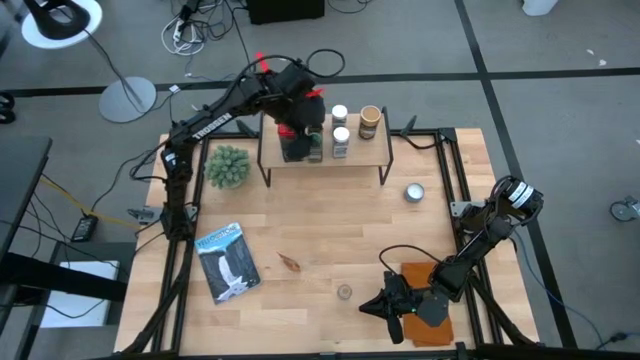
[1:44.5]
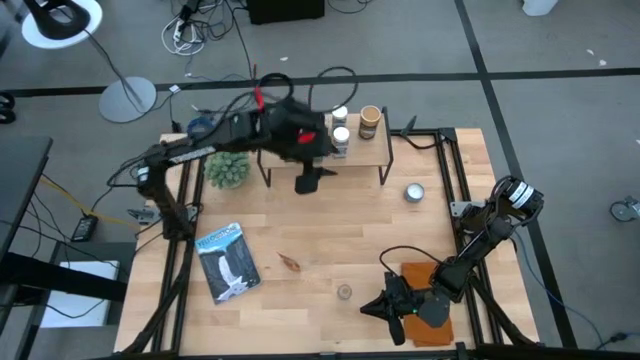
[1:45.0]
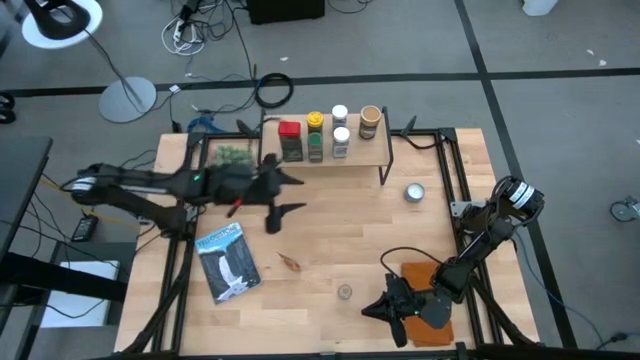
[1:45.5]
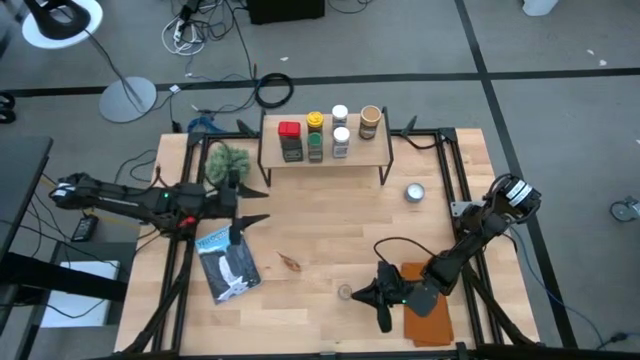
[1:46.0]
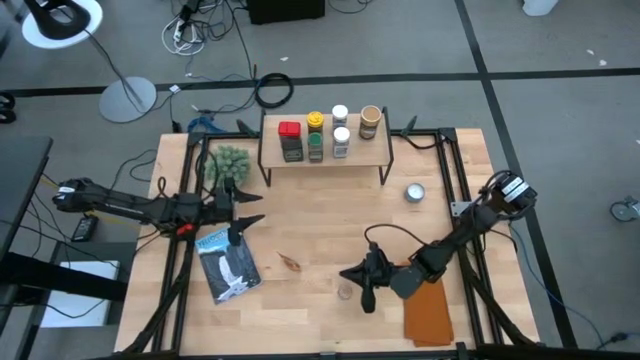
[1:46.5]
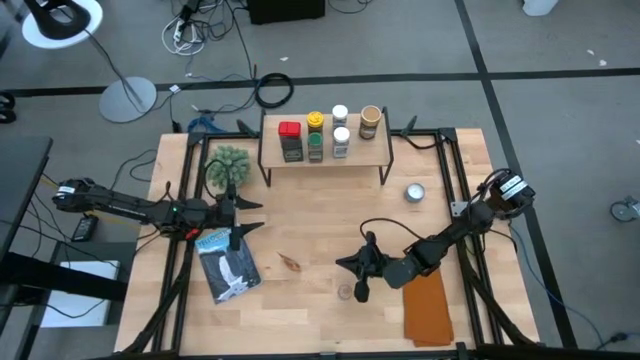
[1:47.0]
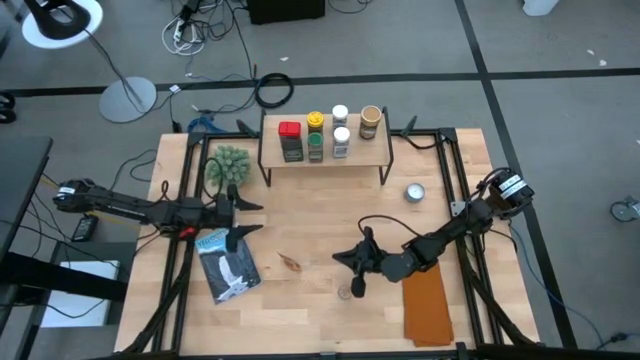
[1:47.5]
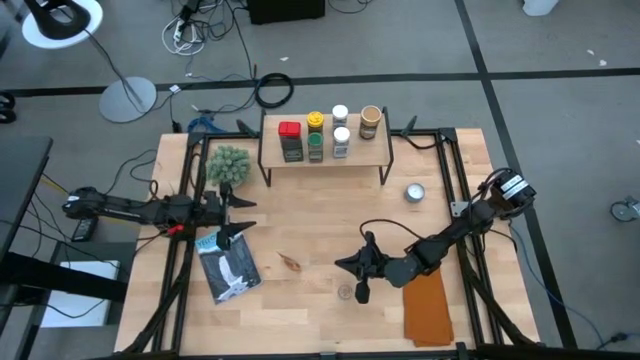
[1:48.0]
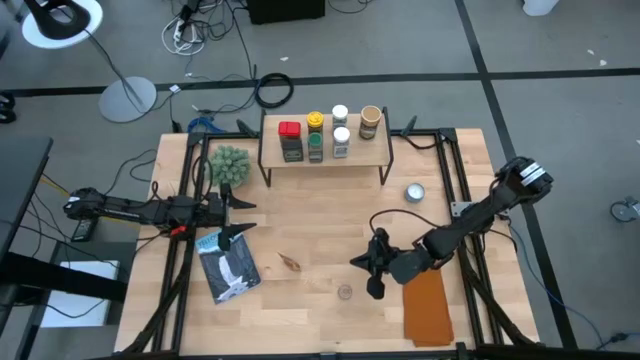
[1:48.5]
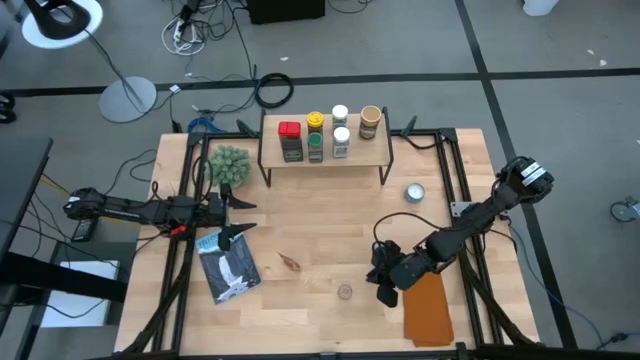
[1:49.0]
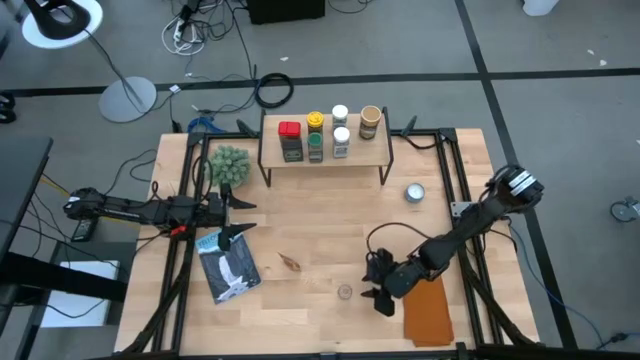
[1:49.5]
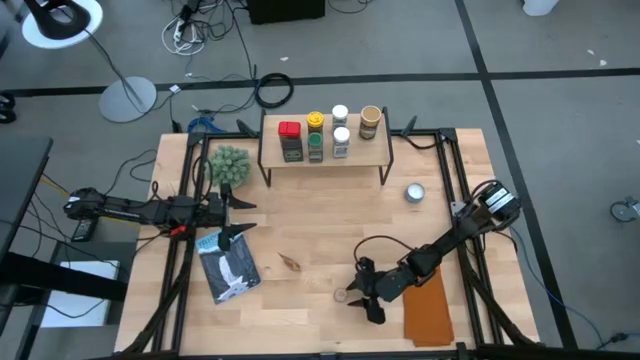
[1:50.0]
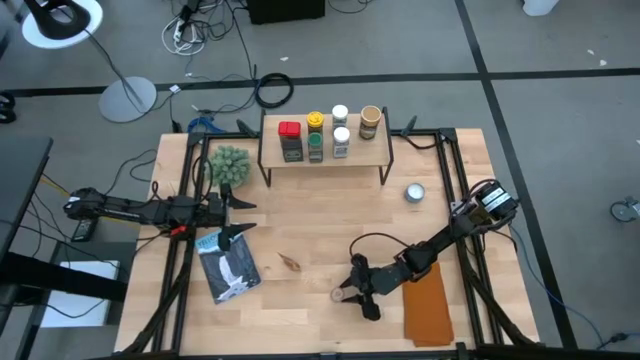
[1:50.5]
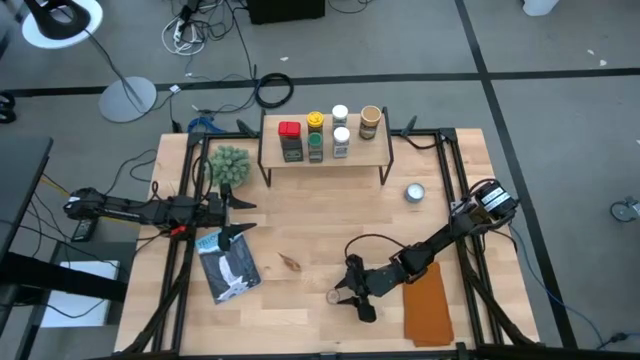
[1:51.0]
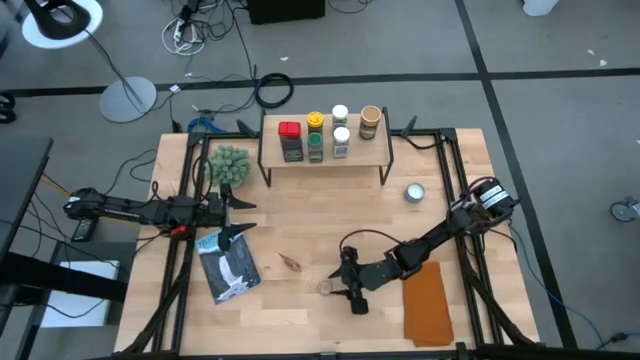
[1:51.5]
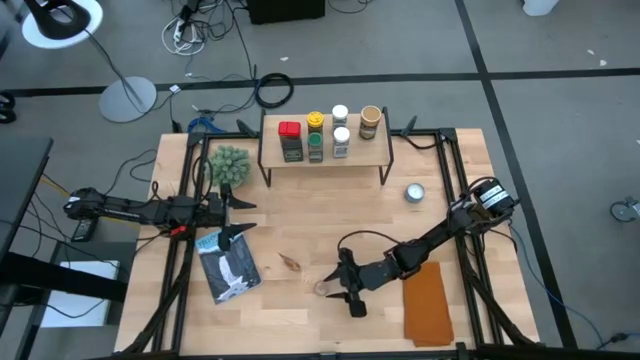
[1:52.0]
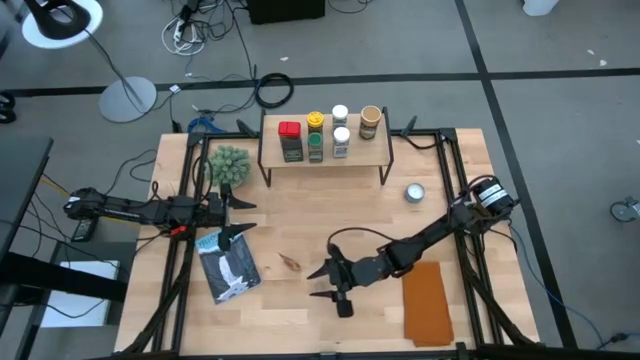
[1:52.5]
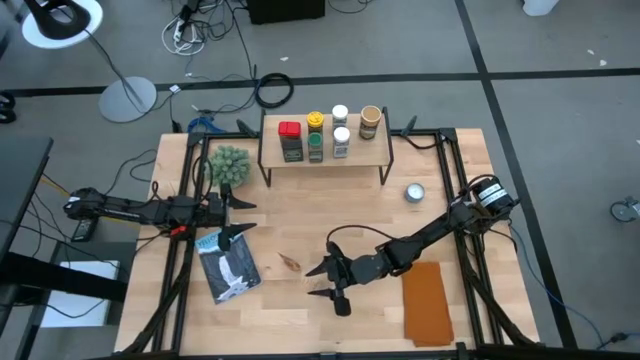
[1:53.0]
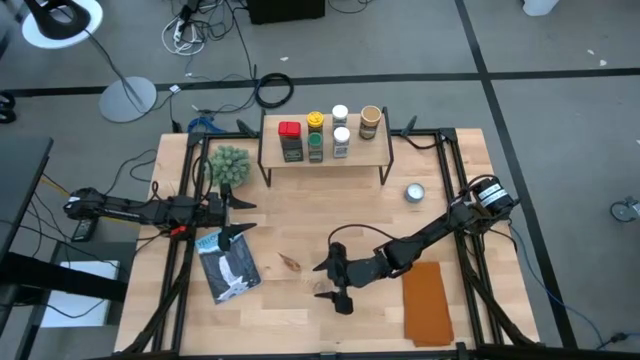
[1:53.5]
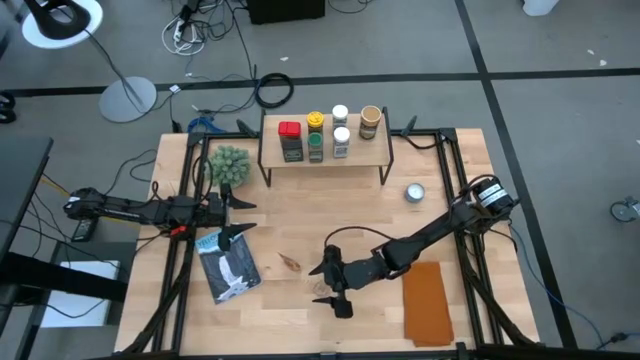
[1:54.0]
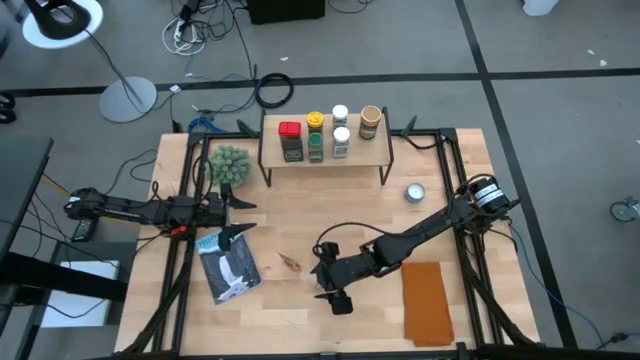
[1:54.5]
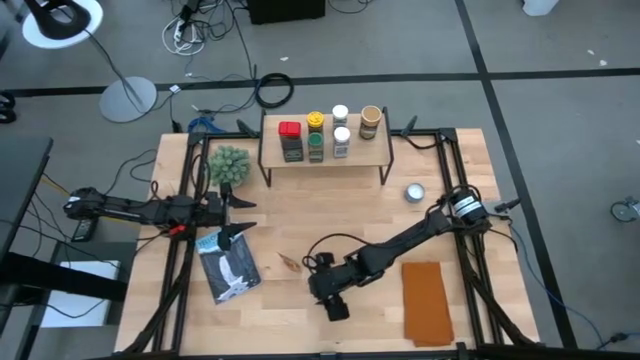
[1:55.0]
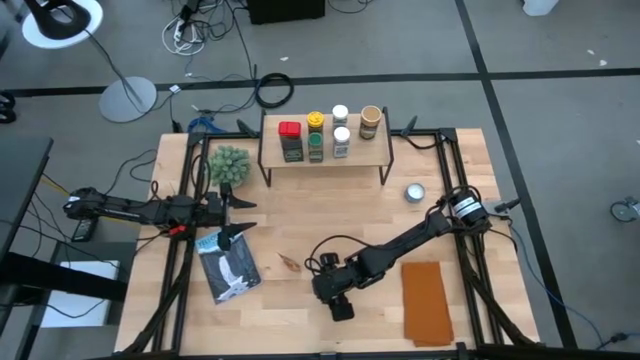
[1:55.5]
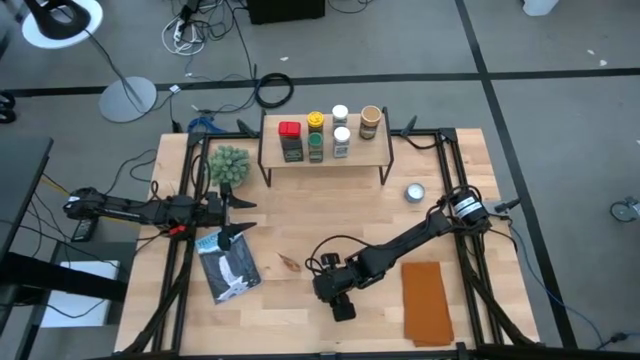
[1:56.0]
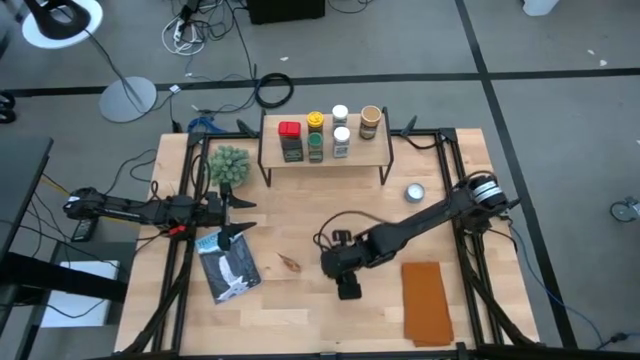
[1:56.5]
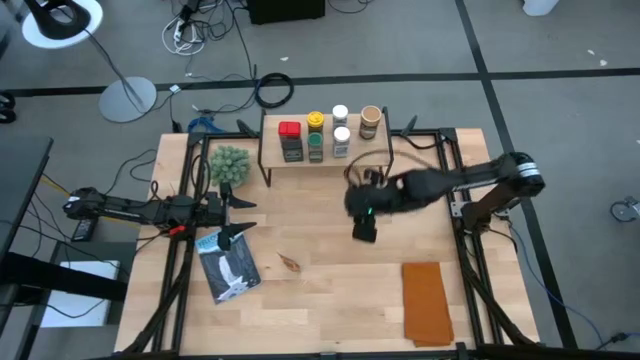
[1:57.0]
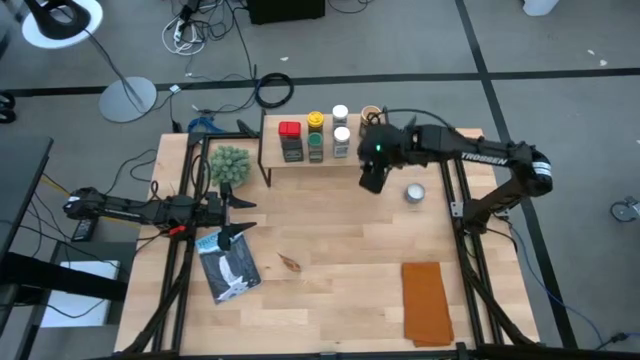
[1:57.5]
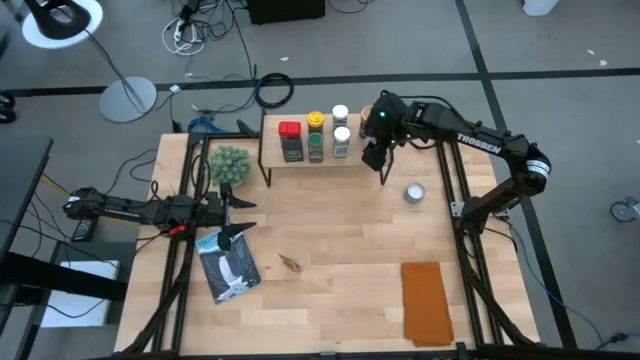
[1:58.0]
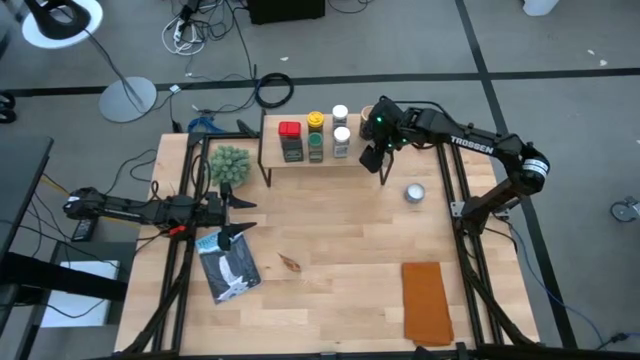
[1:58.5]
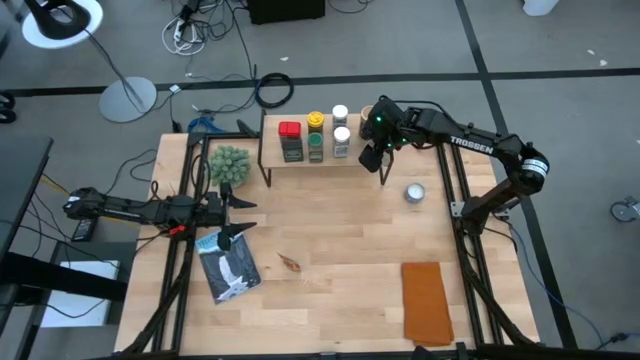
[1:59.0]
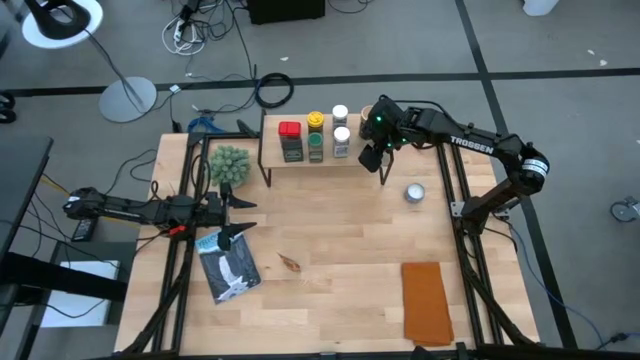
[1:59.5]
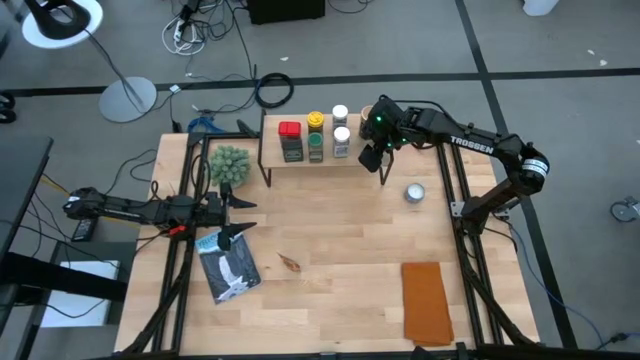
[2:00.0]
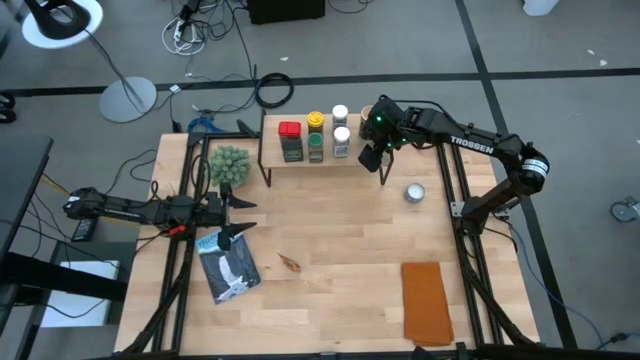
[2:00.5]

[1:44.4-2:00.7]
Task: Shelf spices
Put the brown seasoning bottle on the shelf

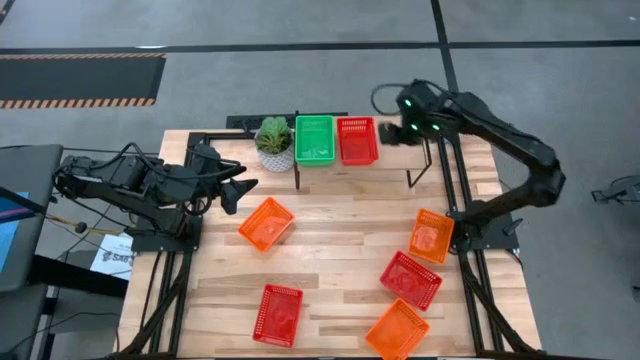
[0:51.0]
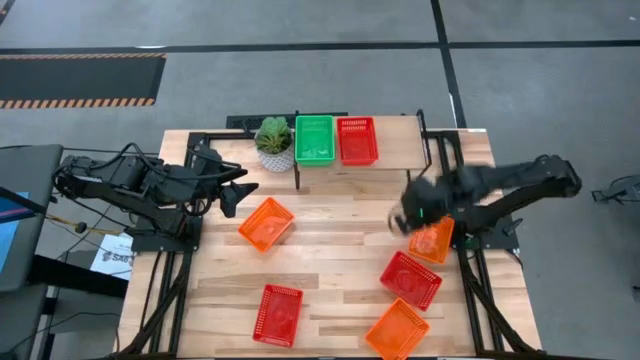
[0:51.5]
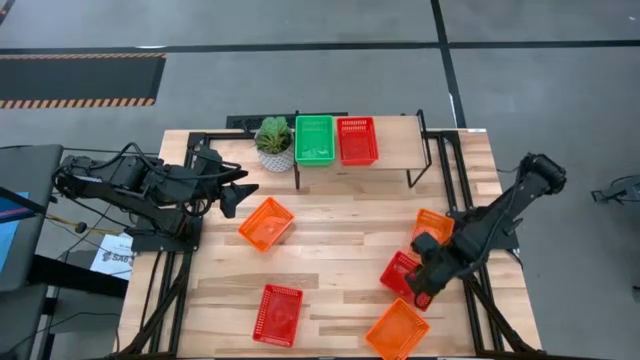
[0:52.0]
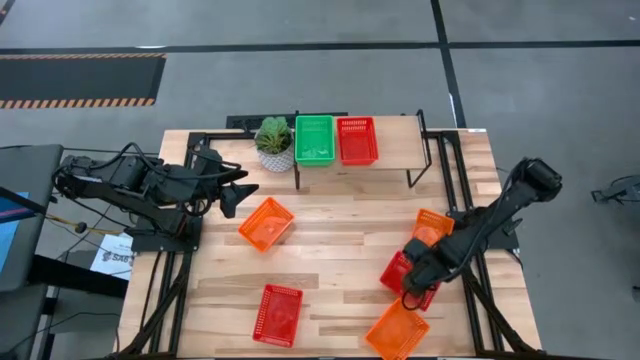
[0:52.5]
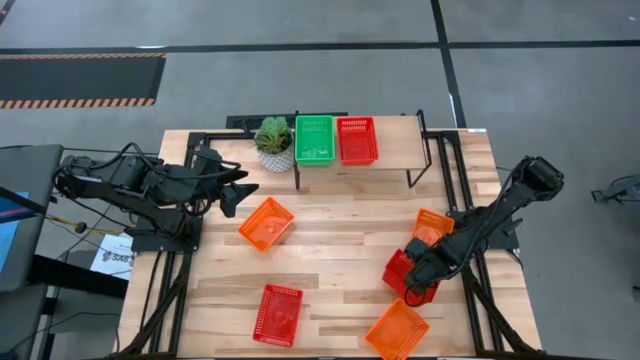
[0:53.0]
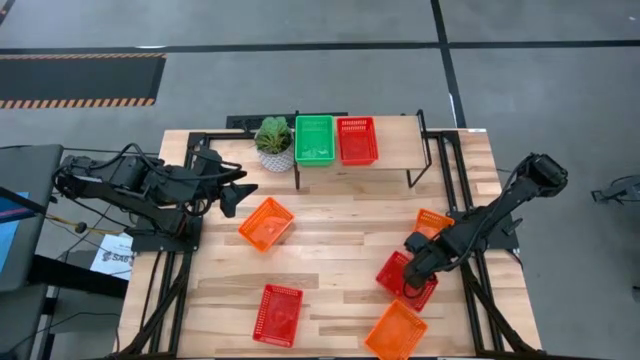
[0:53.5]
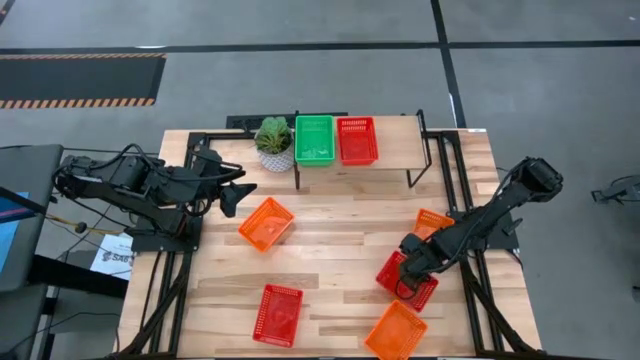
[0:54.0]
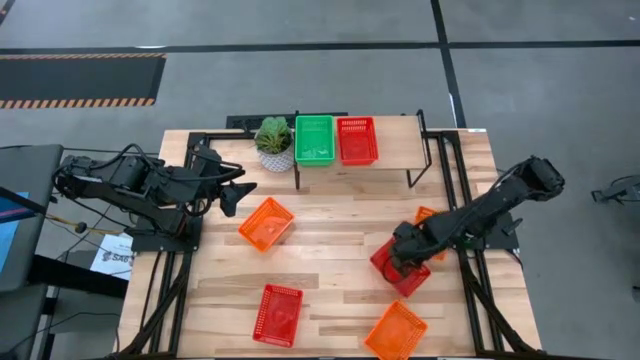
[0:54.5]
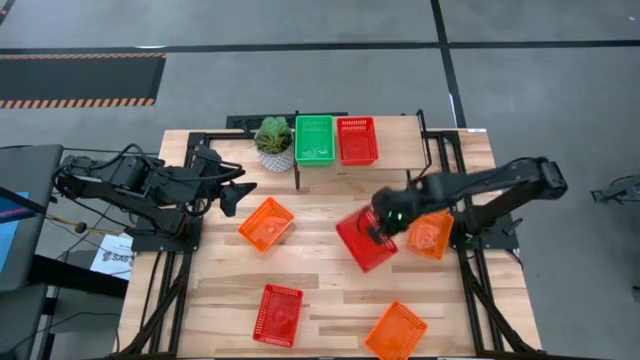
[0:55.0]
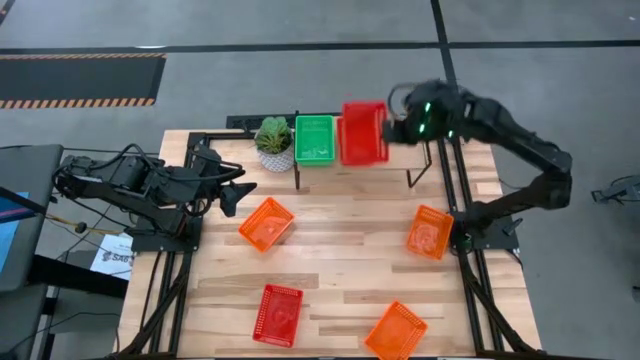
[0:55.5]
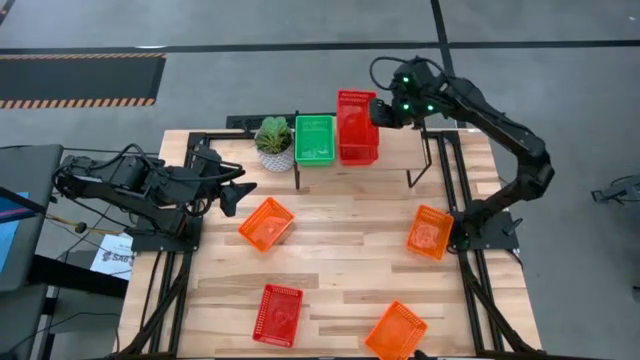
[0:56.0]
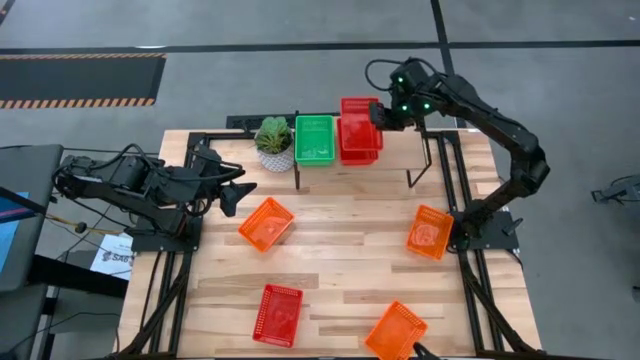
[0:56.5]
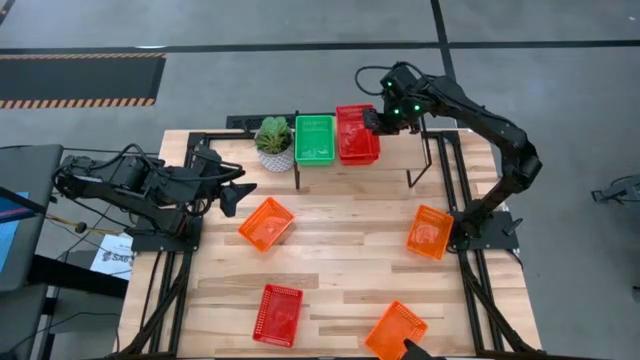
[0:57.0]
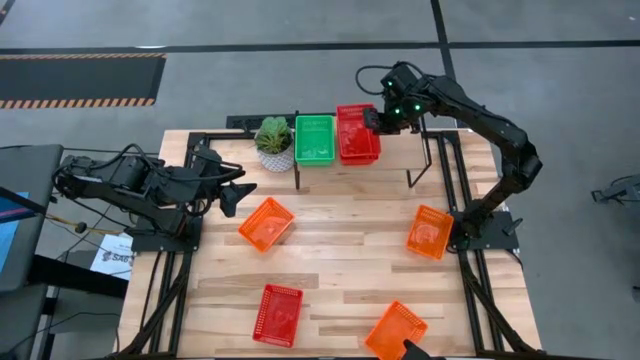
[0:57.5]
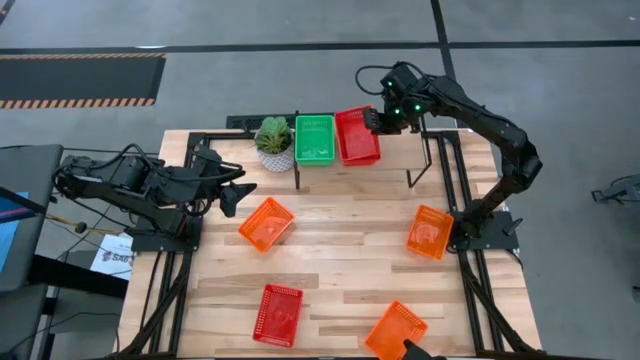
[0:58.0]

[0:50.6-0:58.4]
Task: Stack baskets on shelf by color
Stack the top red bin on top of the red bin on the shelf
